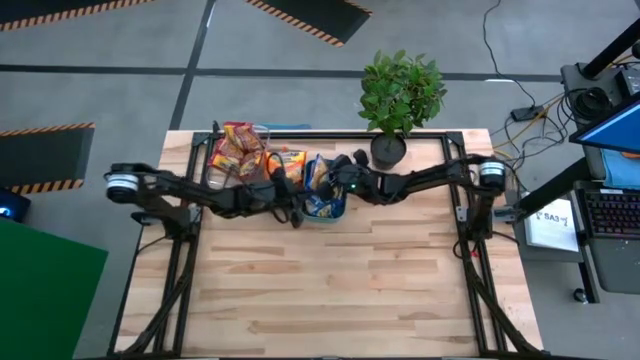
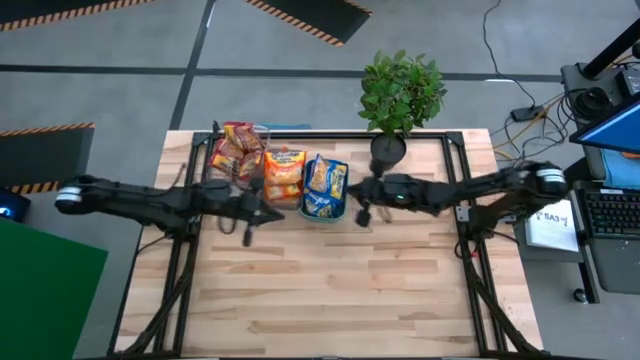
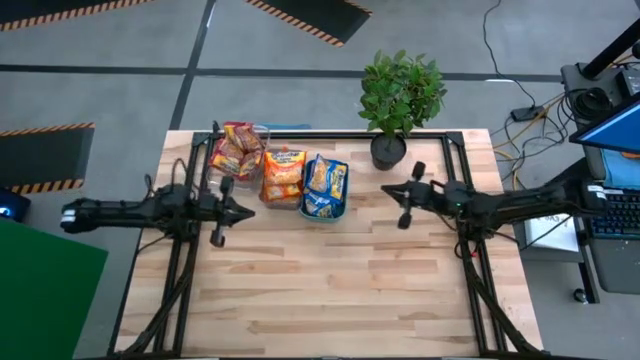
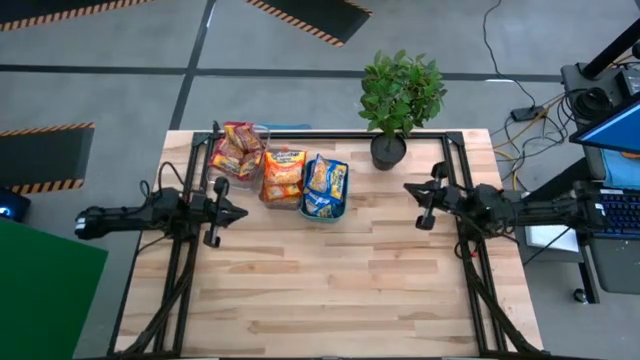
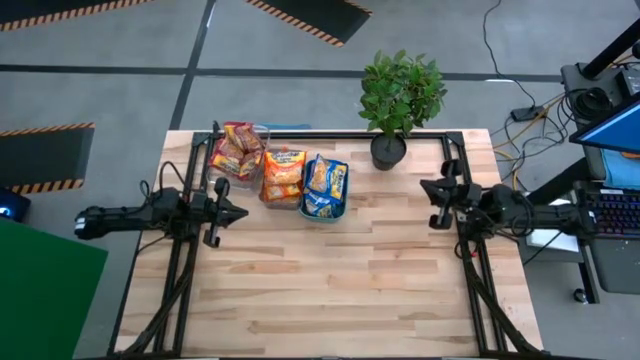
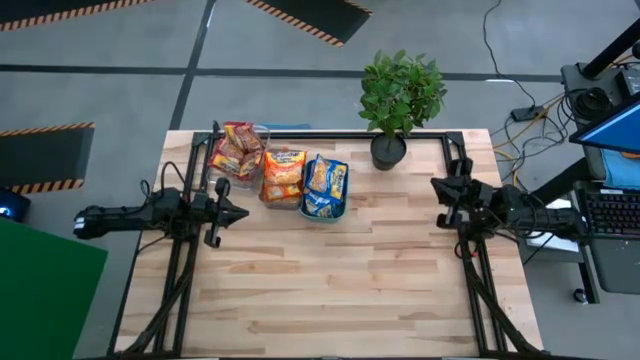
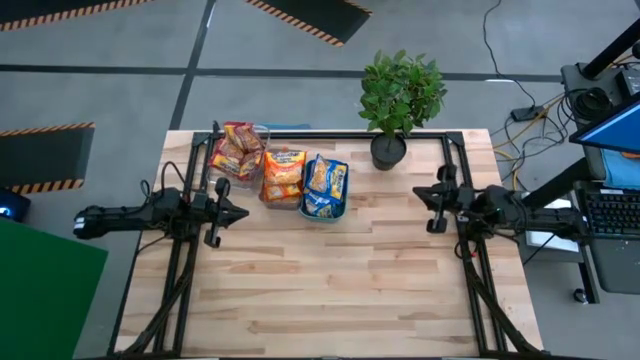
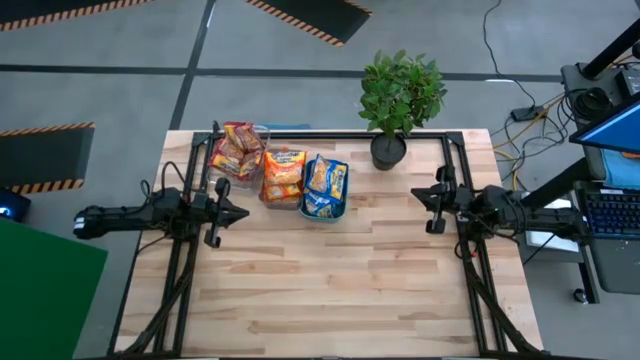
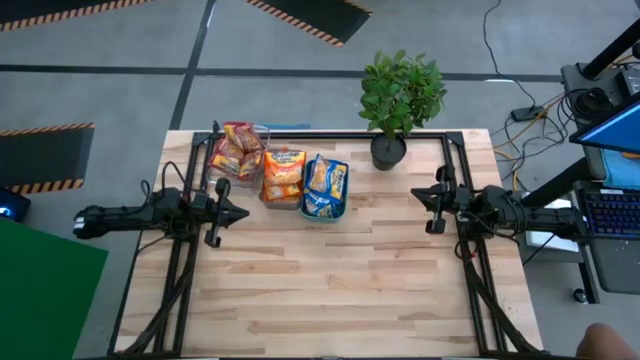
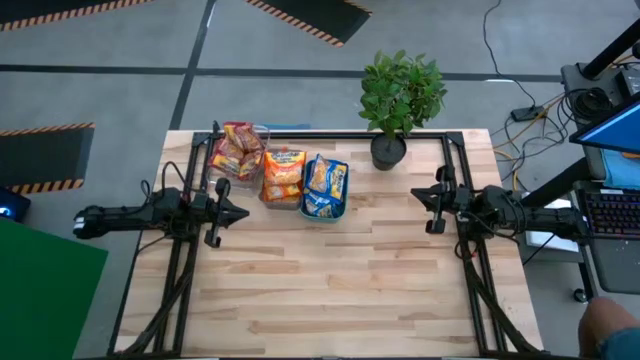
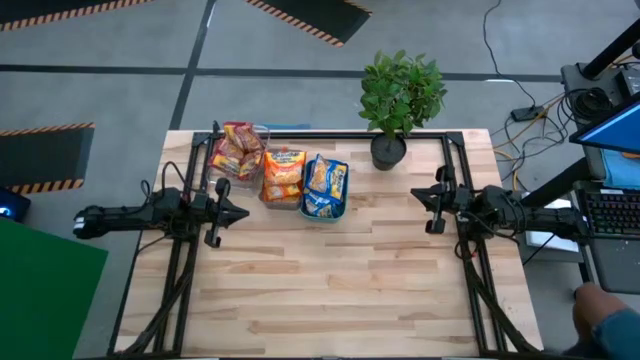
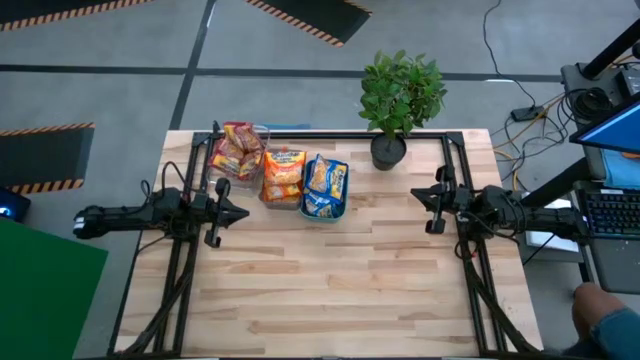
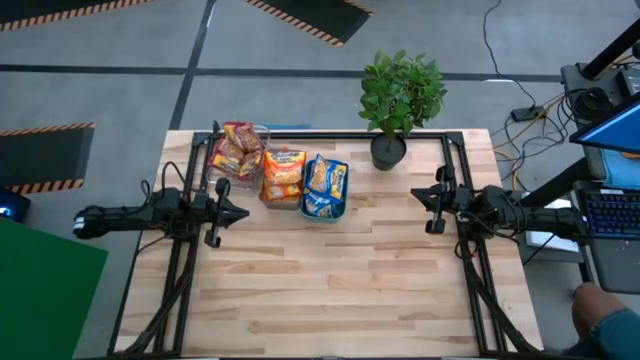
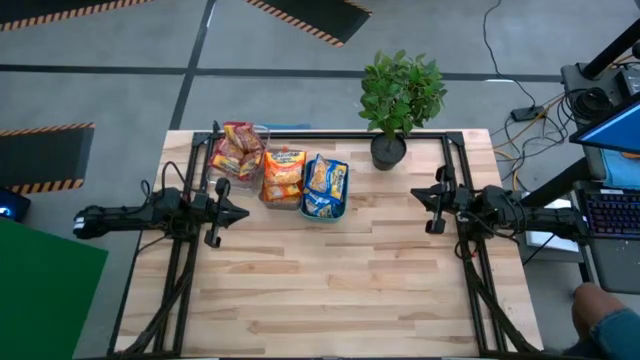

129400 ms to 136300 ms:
Task: Sort Maruchan noodles
Return to Home Position

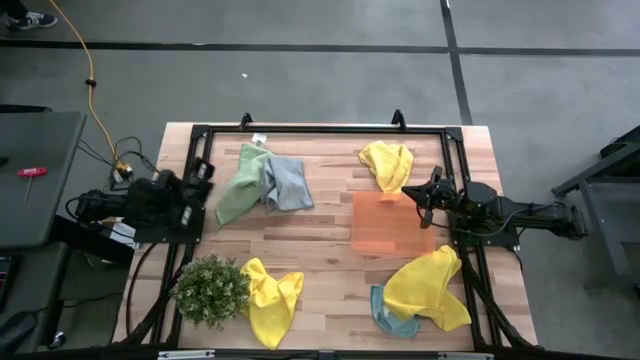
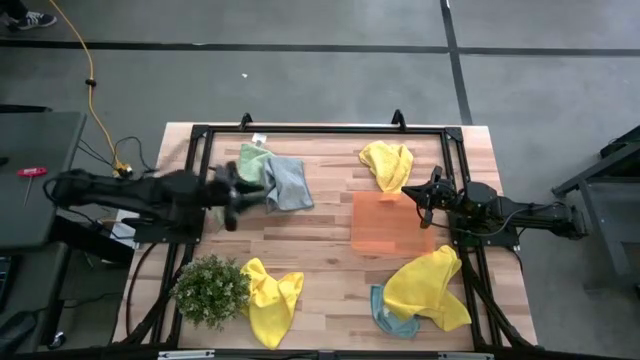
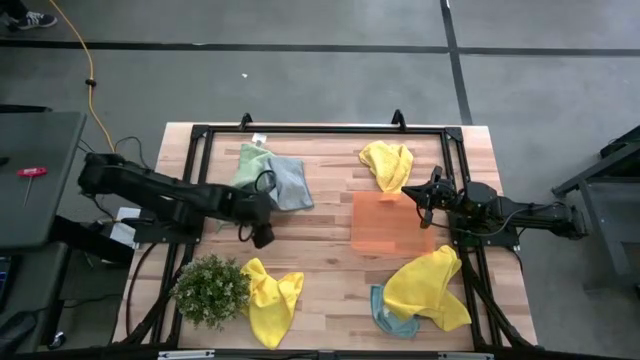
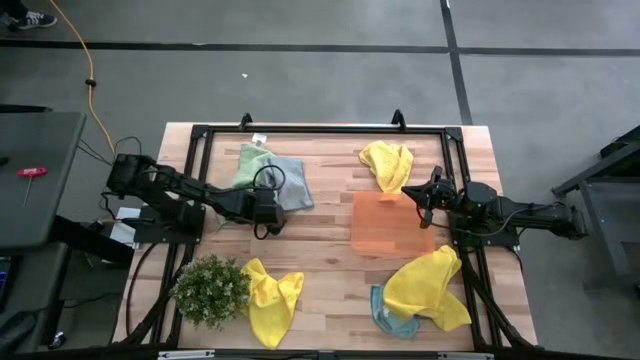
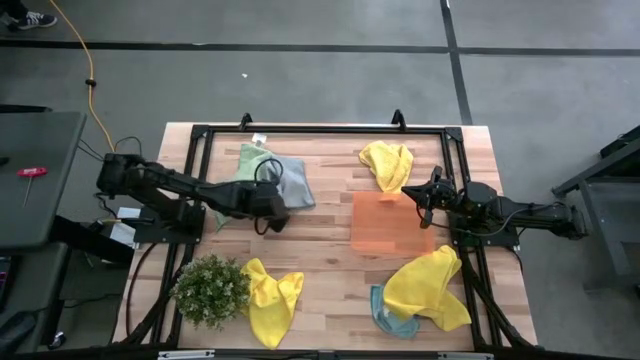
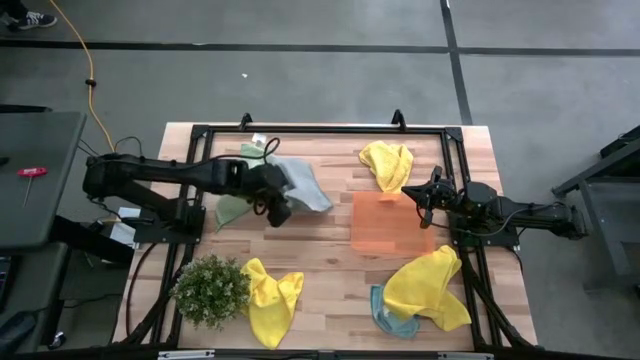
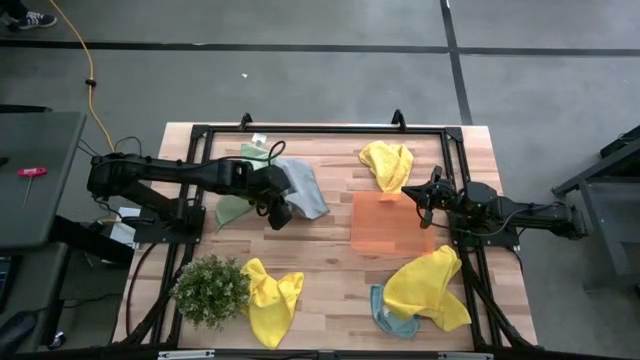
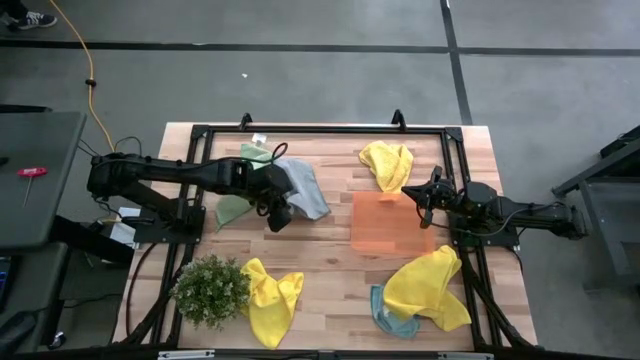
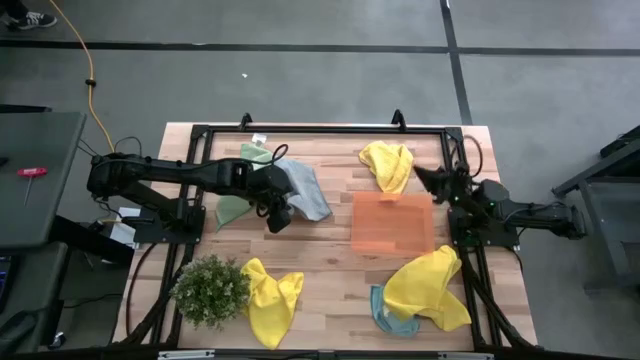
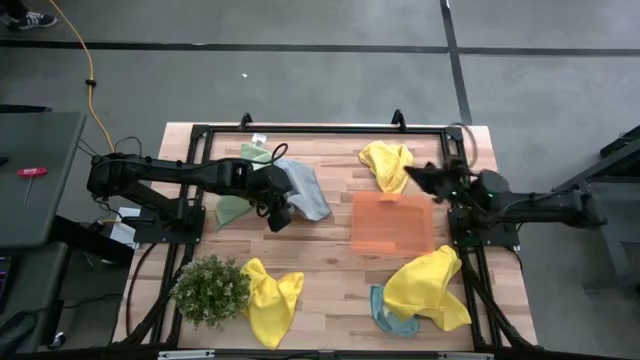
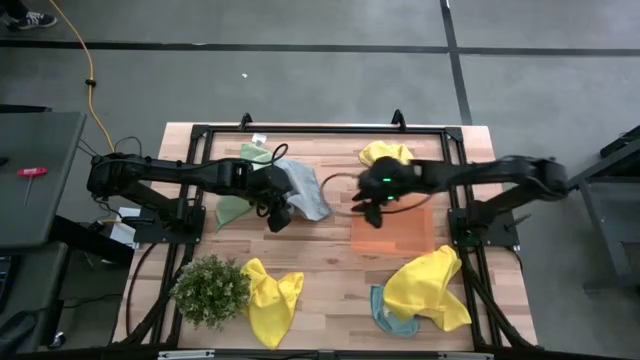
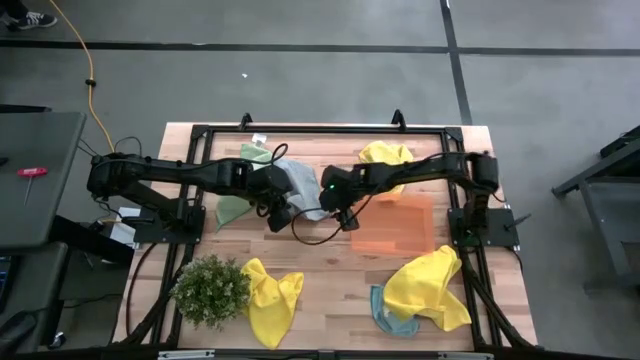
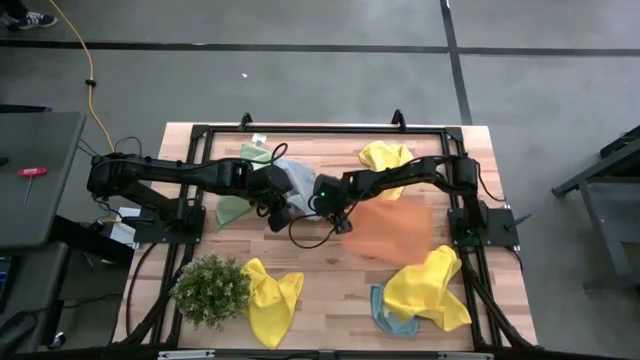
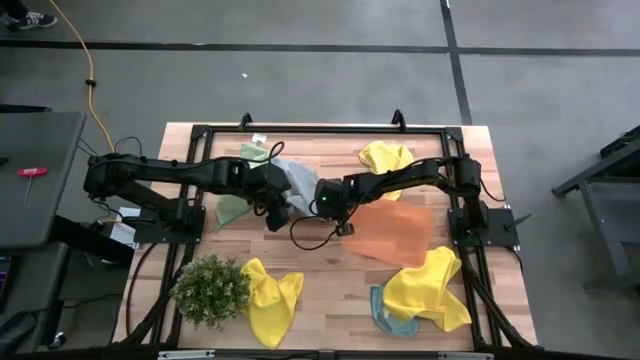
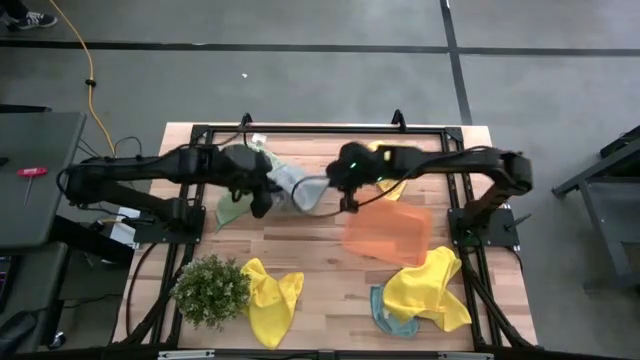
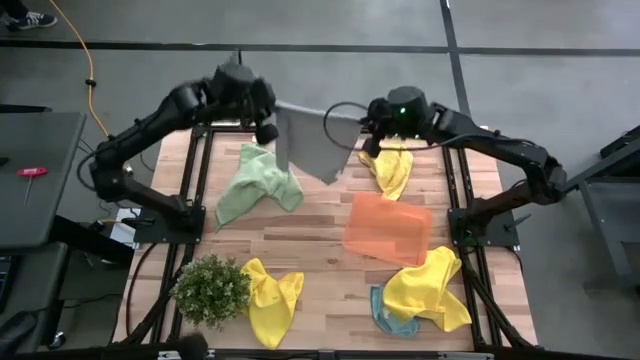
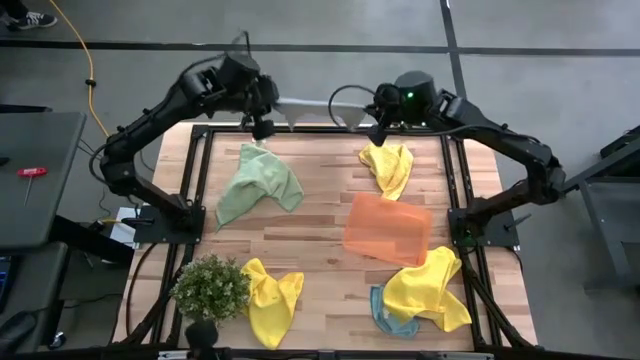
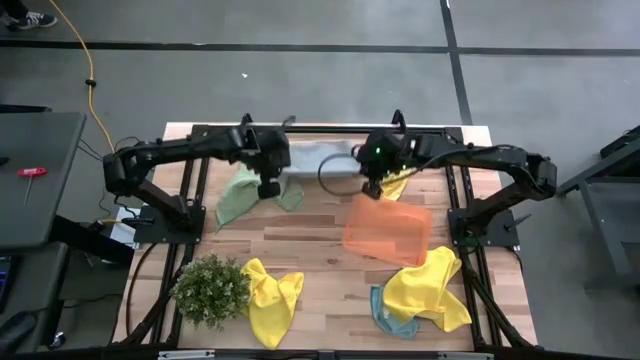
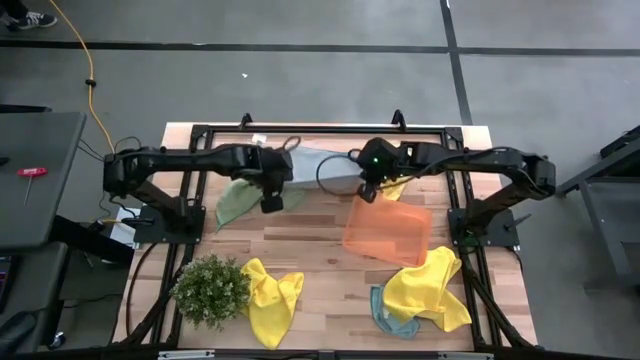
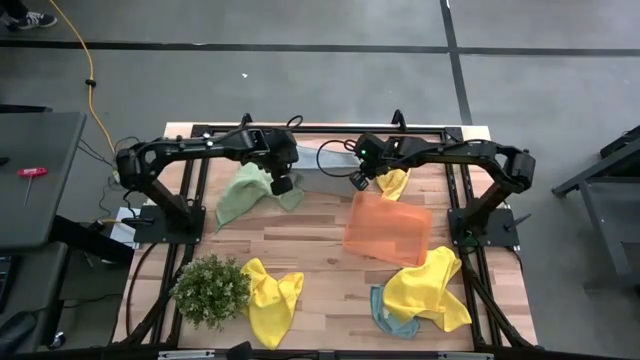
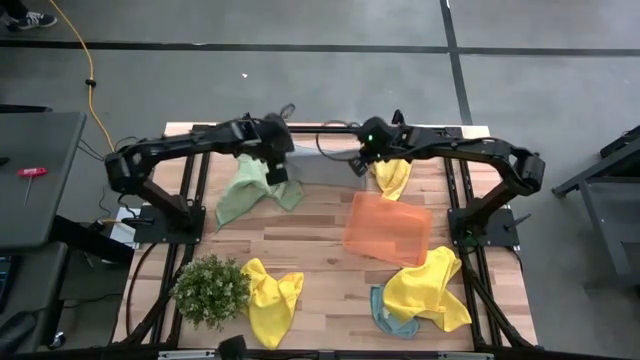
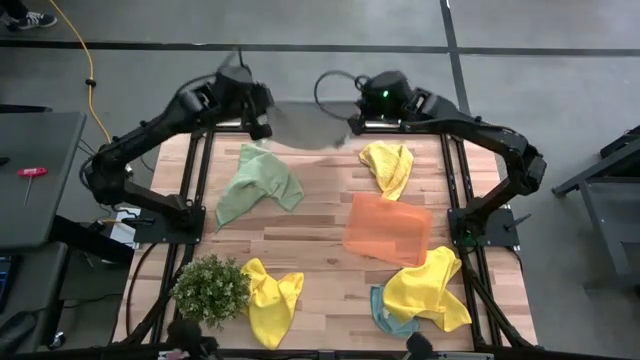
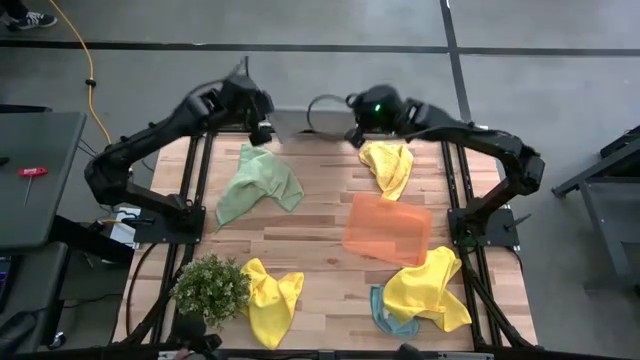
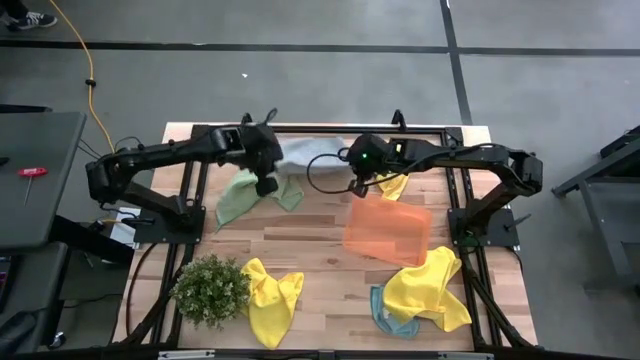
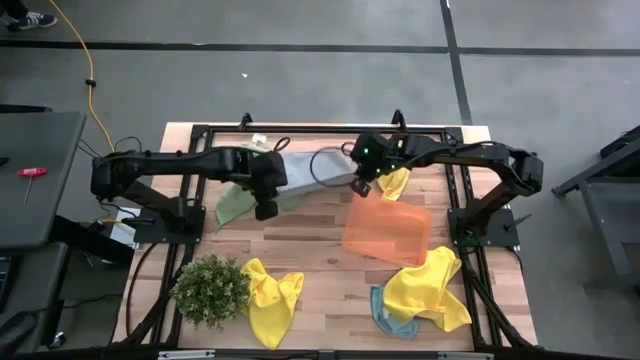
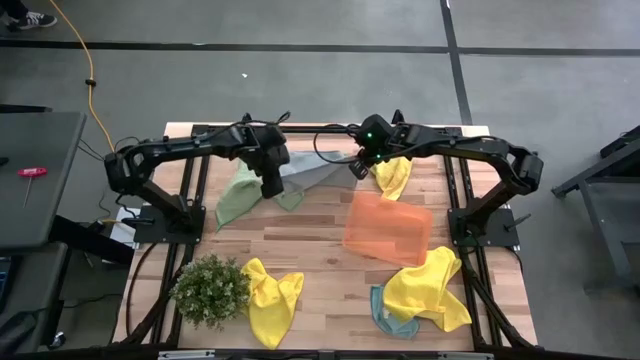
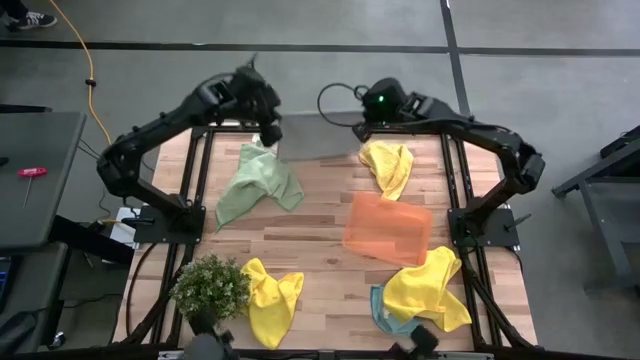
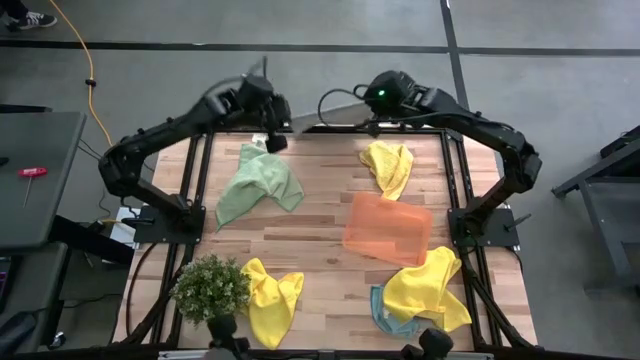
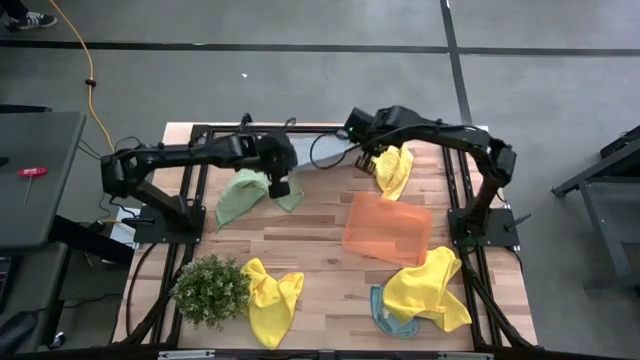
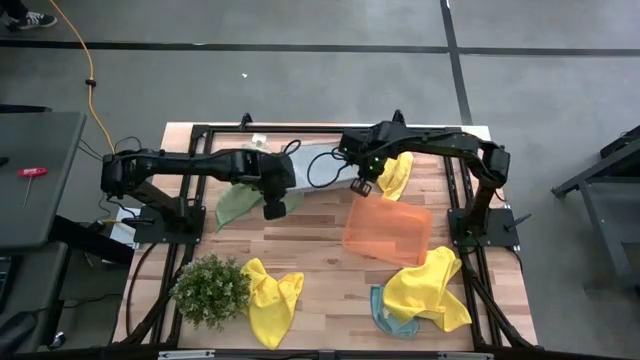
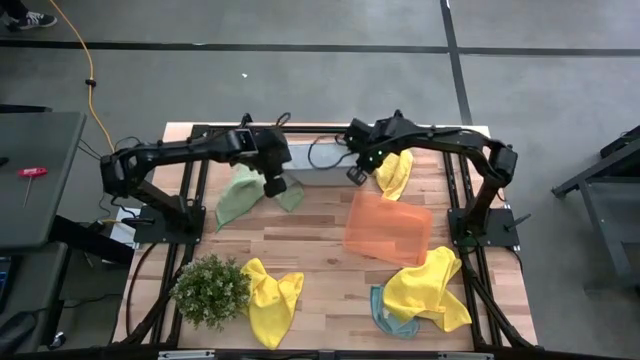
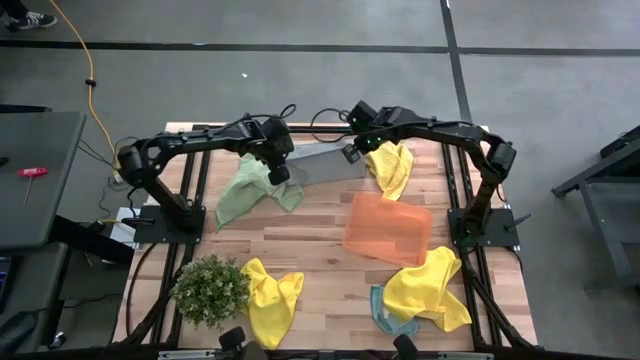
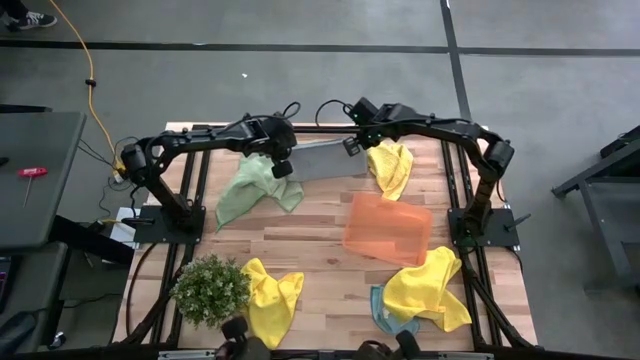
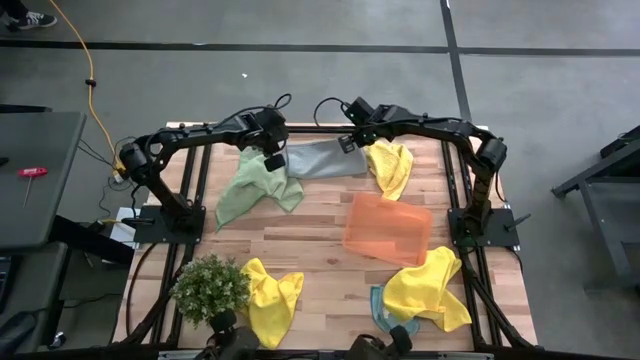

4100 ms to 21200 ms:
Task: Fold microfiber towels
Fold the gray microfiber towel
